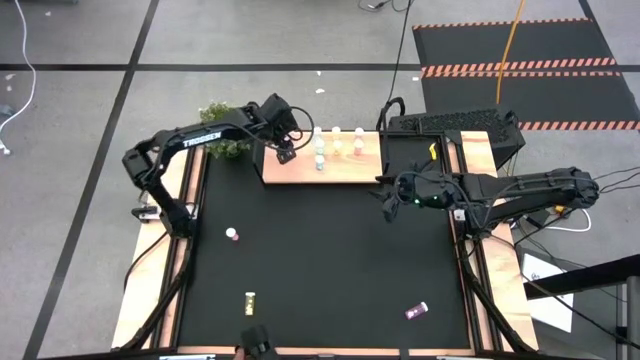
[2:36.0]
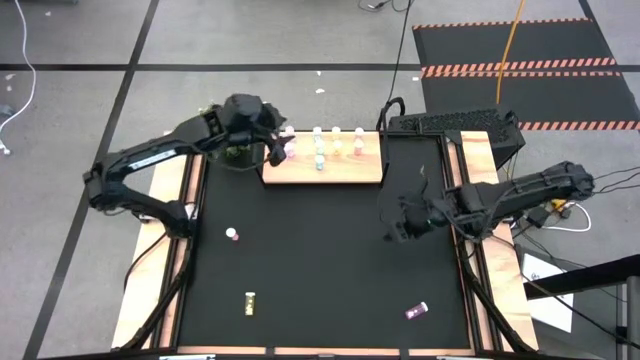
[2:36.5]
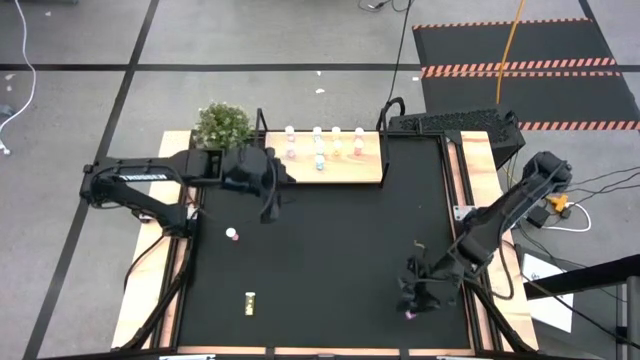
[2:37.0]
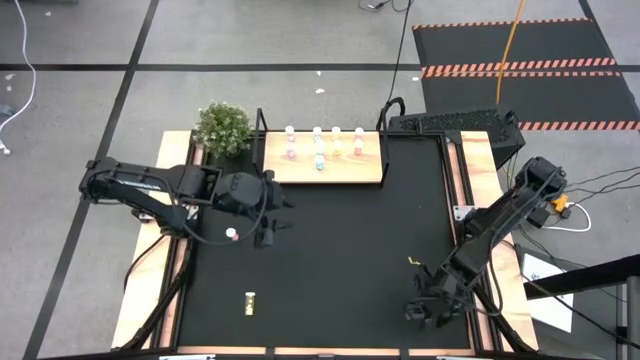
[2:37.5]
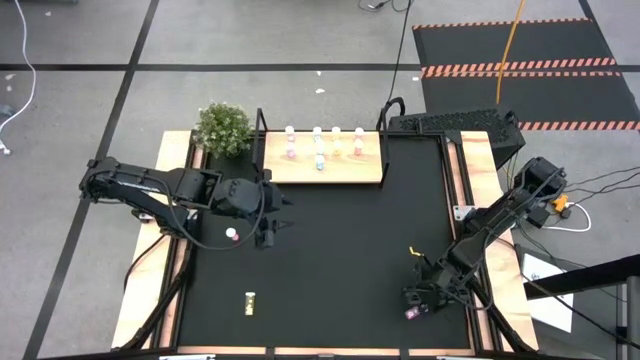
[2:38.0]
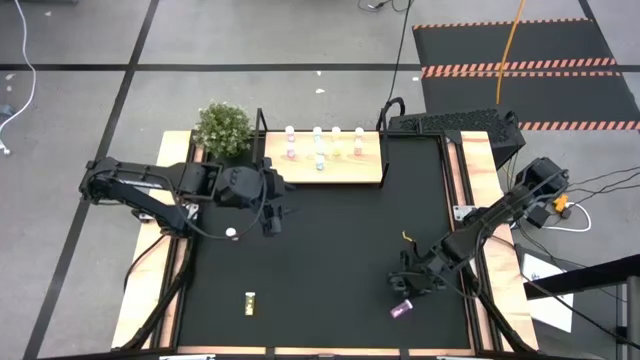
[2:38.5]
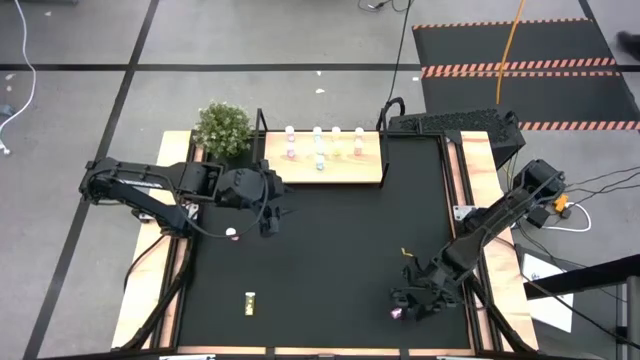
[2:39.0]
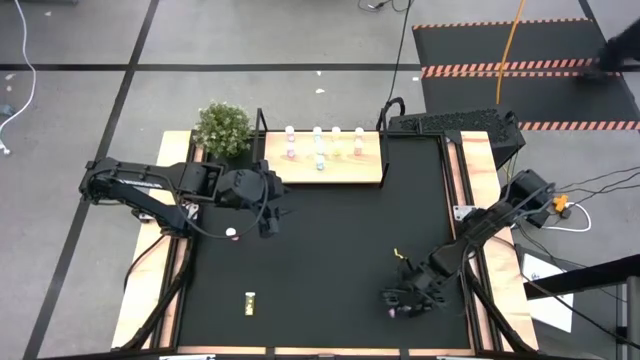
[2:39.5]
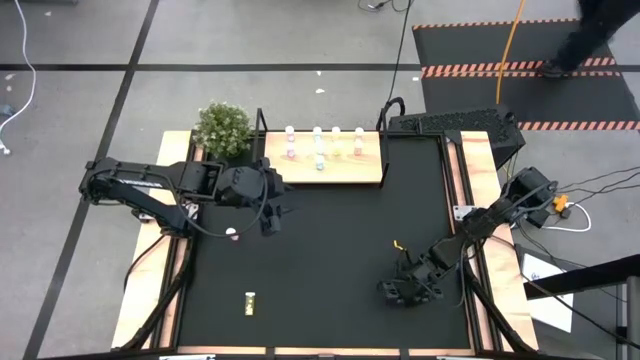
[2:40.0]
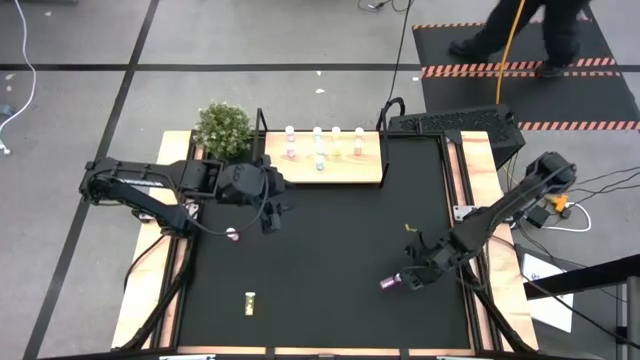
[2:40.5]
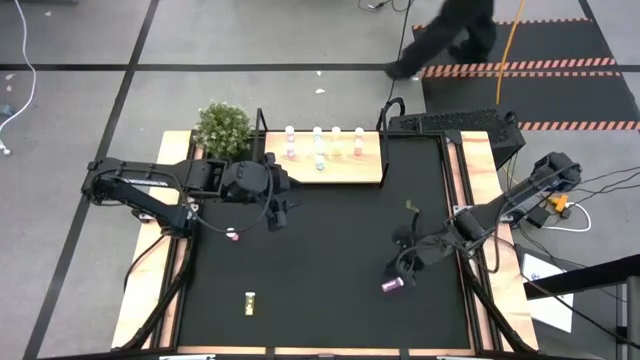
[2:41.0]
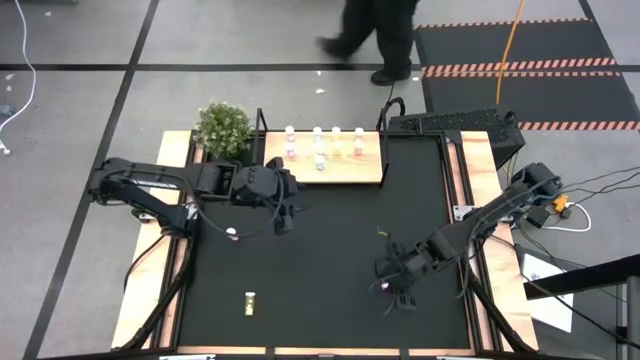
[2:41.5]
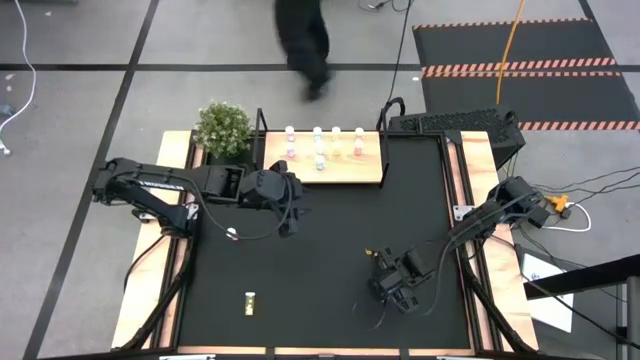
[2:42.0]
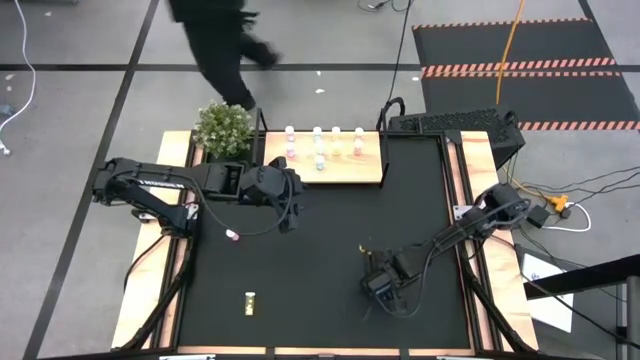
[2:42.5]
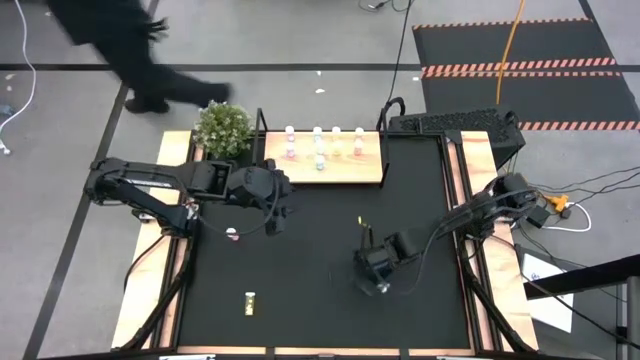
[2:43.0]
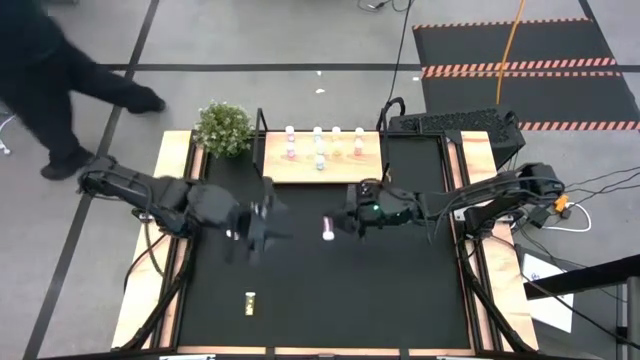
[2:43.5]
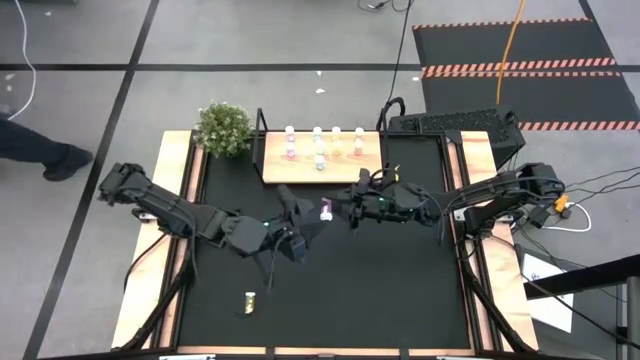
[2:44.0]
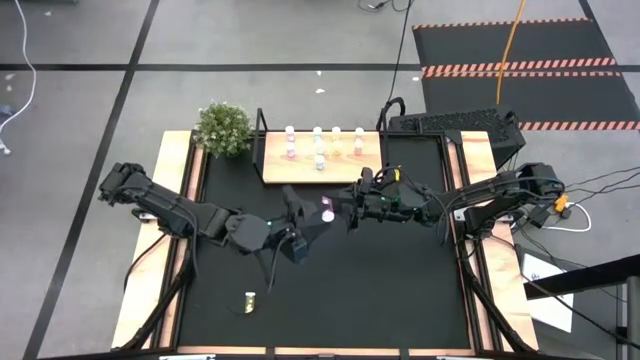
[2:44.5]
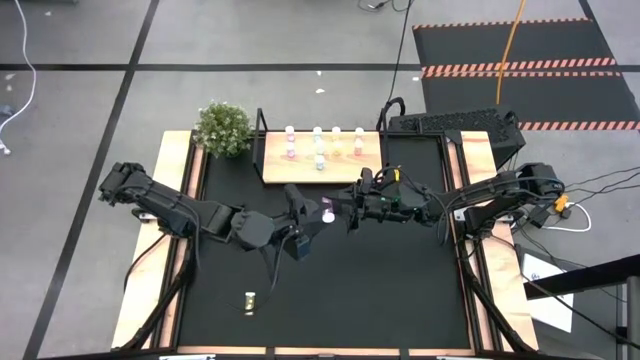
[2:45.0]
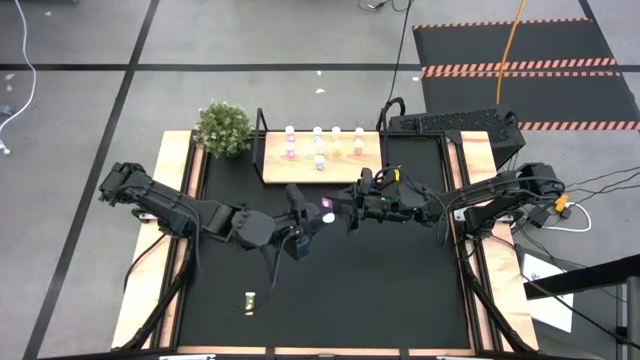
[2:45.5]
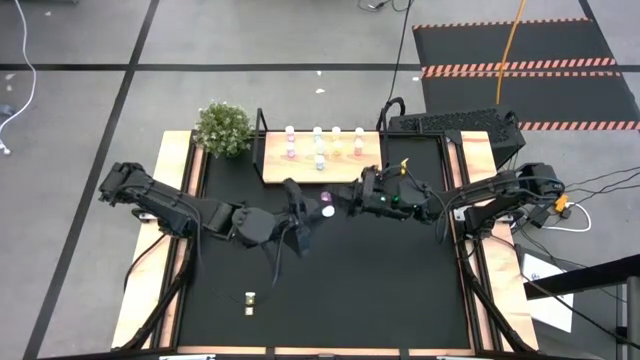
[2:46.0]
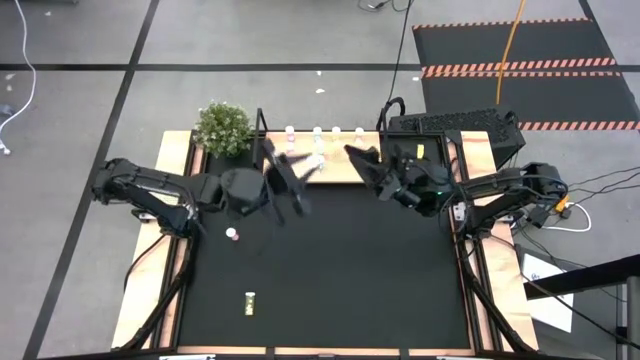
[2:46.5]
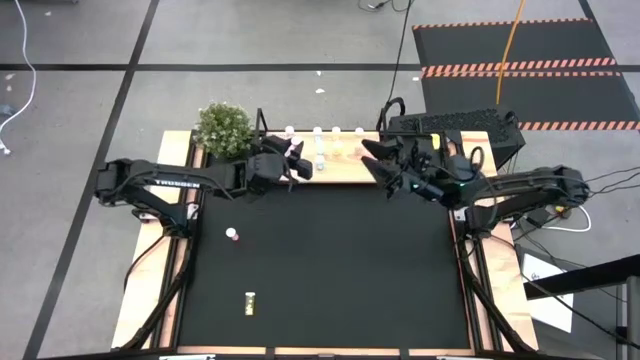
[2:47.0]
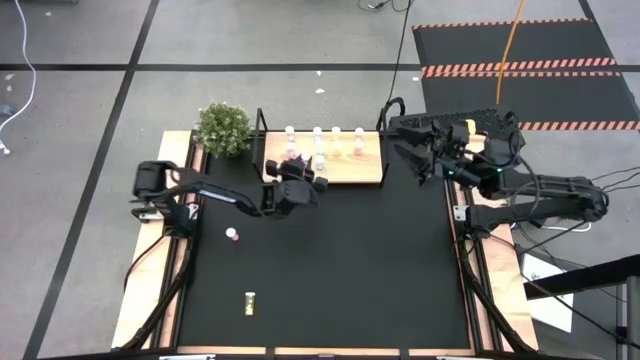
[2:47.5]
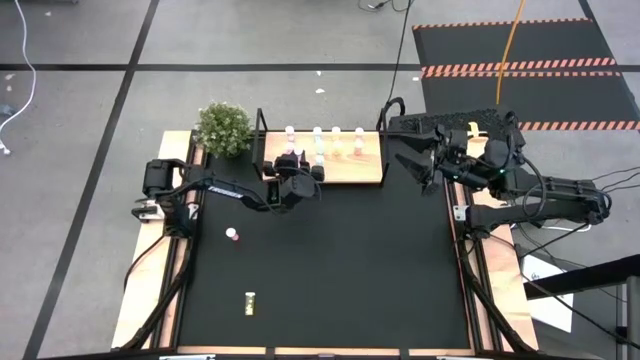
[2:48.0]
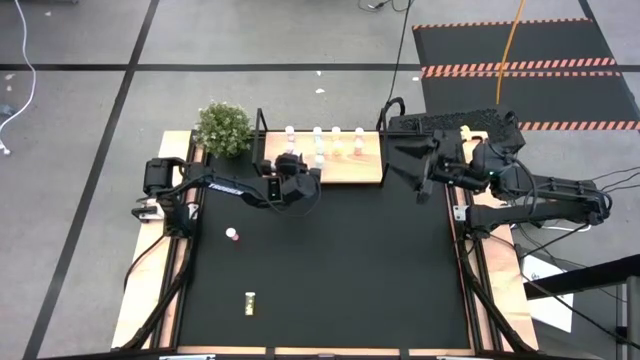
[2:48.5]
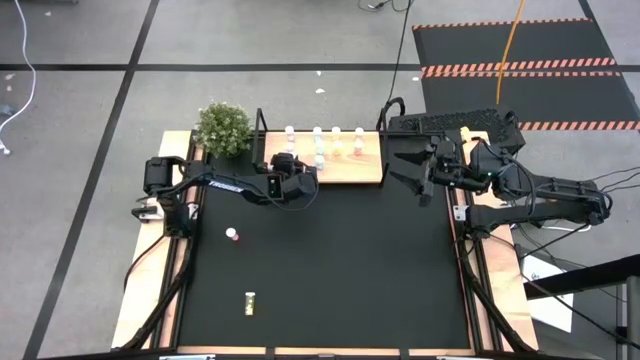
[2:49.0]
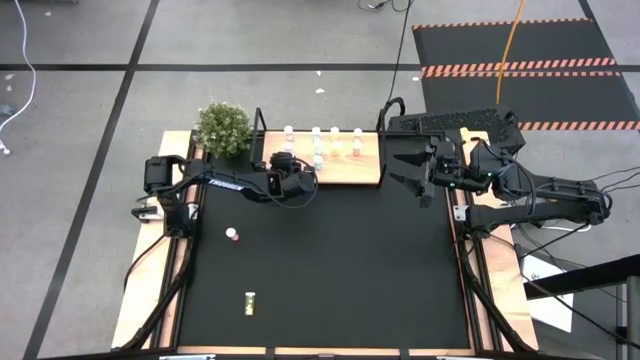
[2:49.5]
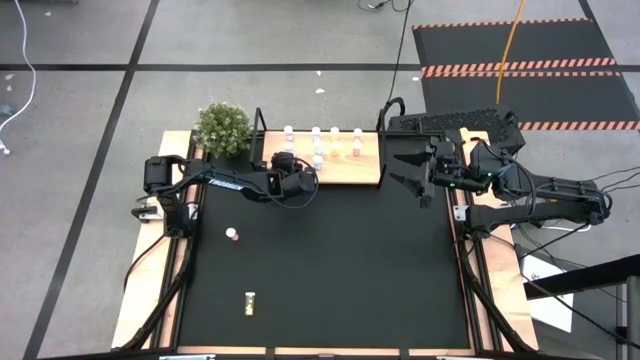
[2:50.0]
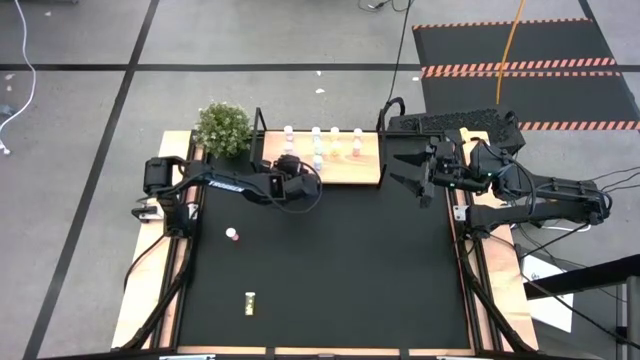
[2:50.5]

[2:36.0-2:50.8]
Task: Pick and place medicine bottles onto shelf by color
Put the purple pill bottle on the shelf aligned with the other purple pill bottles

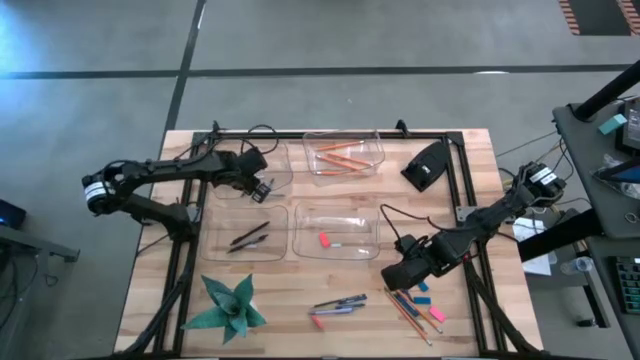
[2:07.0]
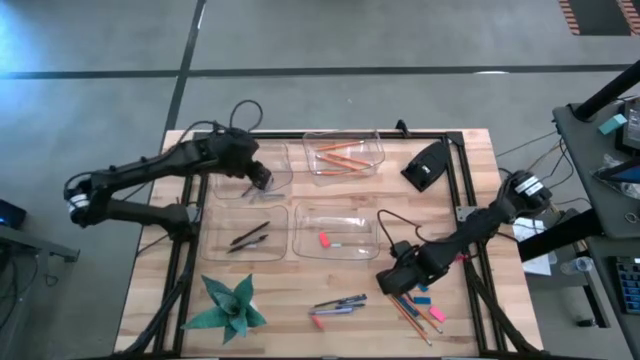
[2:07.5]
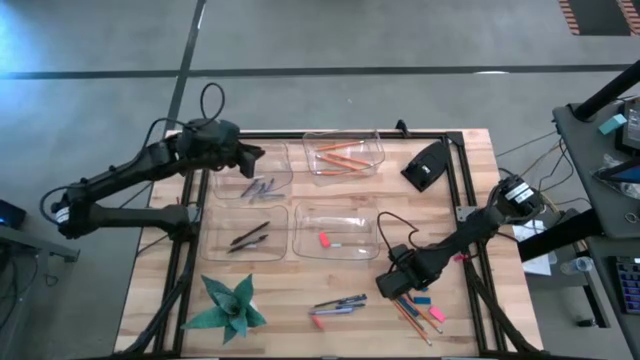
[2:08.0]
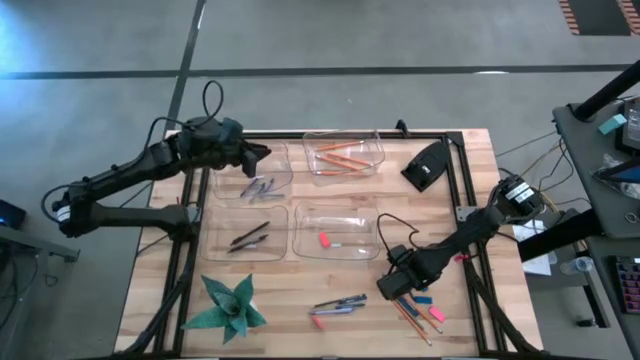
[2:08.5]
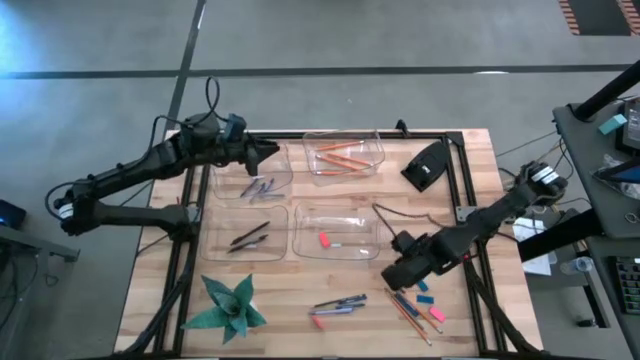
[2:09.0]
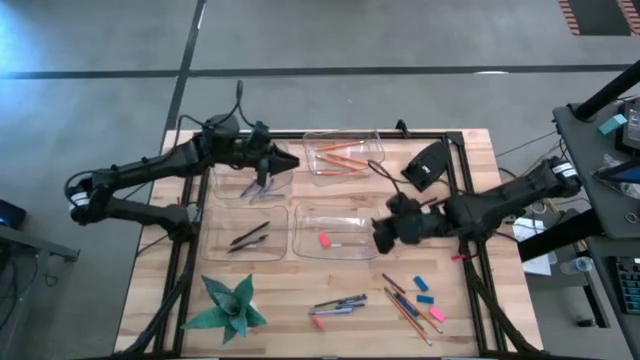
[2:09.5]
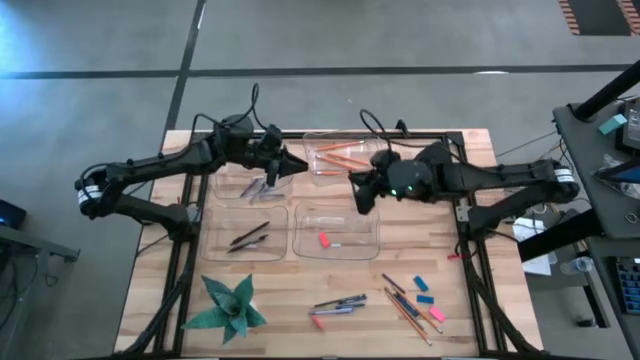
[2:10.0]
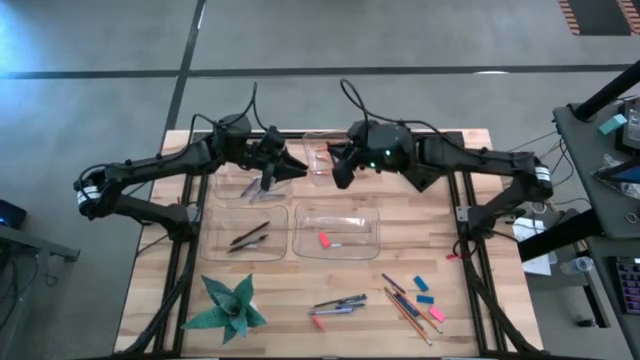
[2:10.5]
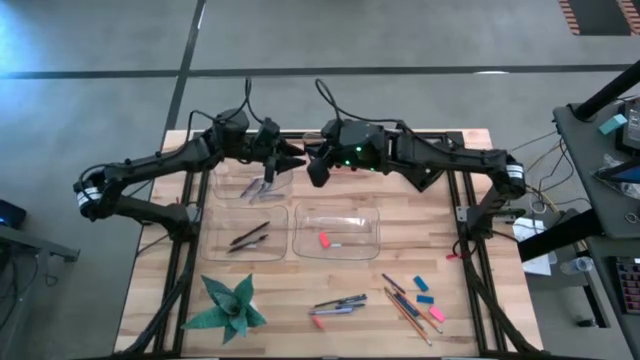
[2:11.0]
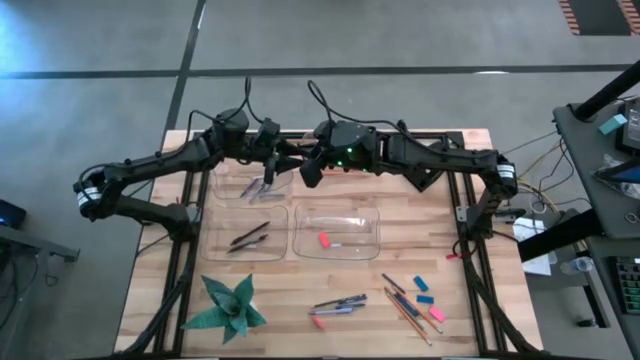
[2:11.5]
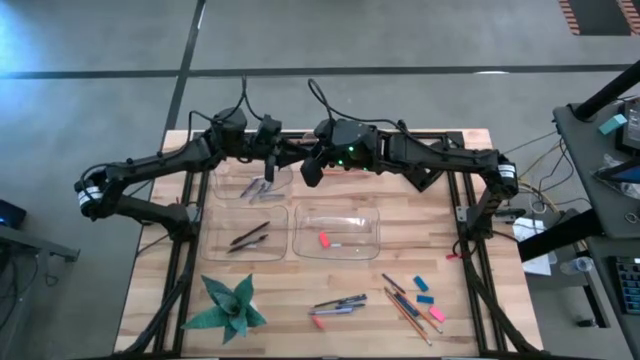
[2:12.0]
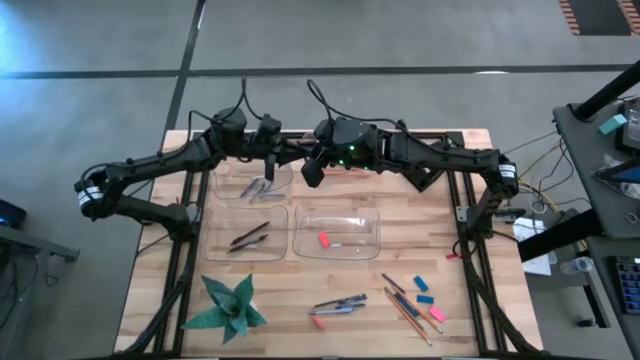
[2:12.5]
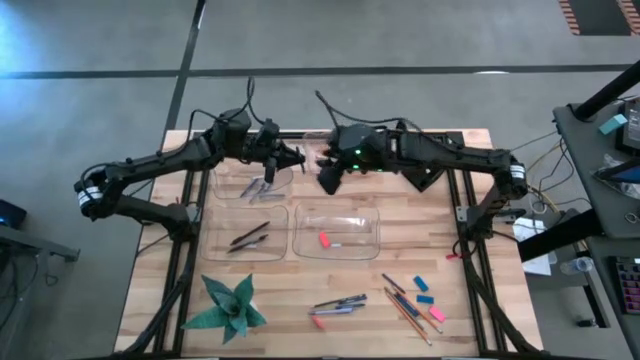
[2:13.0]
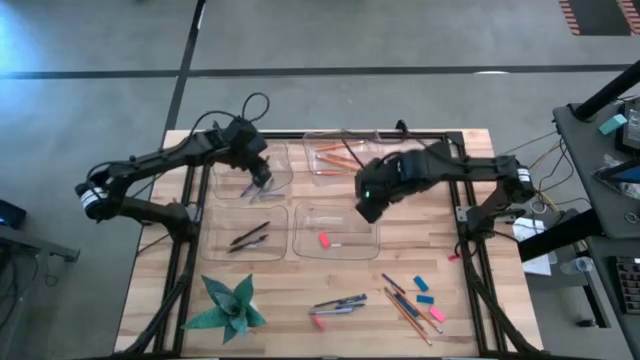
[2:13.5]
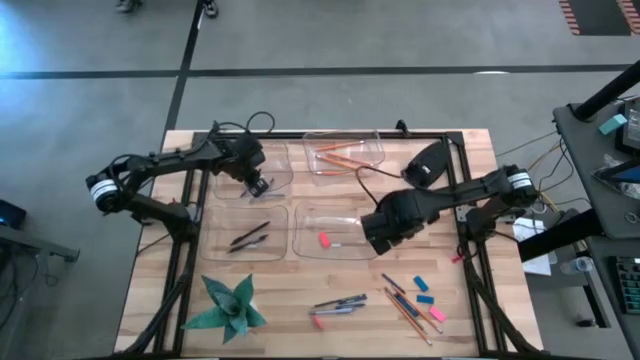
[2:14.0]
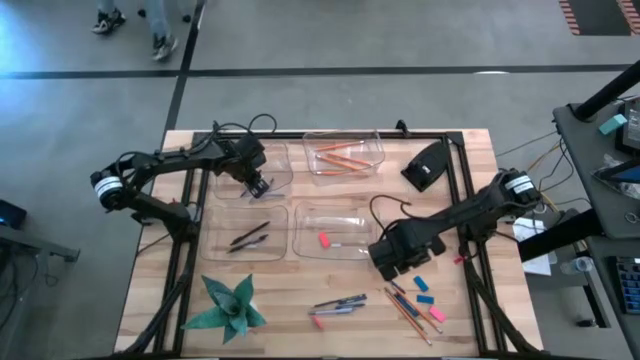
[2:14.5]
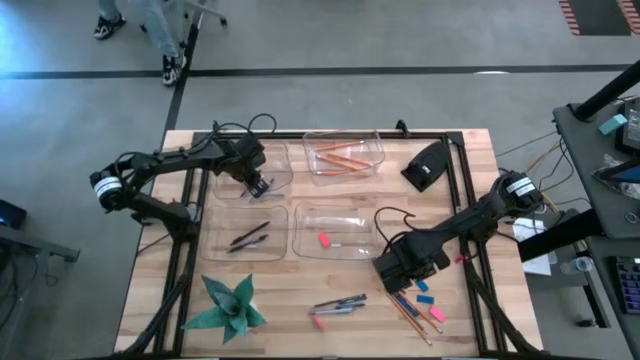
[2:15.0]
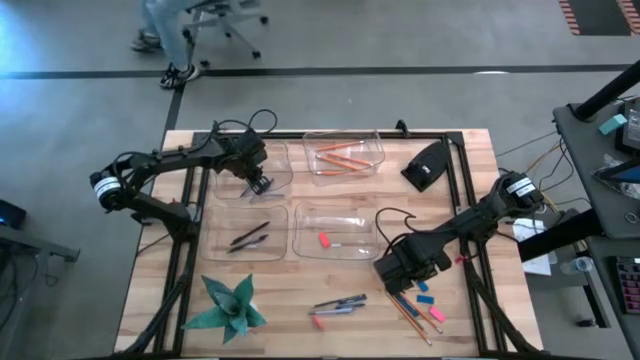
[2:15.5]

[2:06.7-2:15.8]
Task: Sort crayons/erasers/pens/pencils in bins
Put the blue crayon into the top left transparent bin
